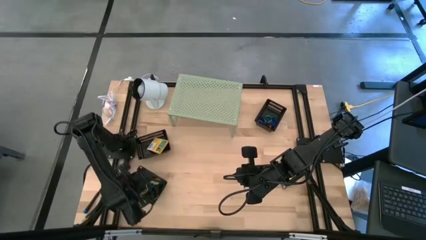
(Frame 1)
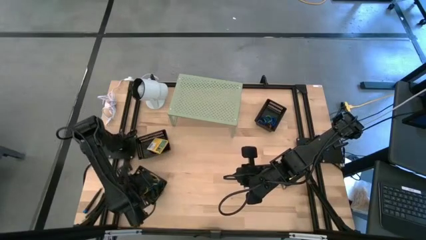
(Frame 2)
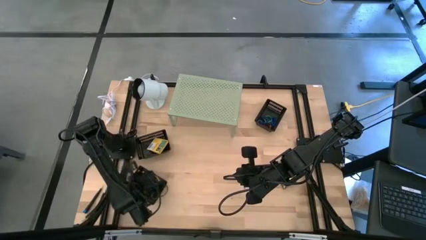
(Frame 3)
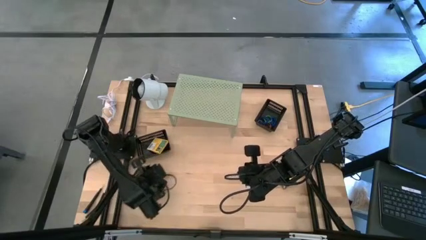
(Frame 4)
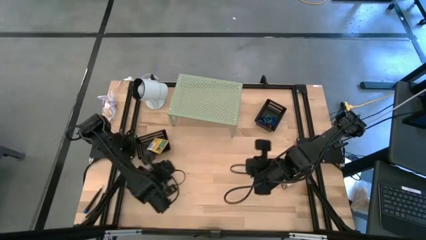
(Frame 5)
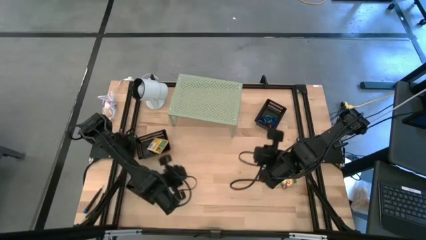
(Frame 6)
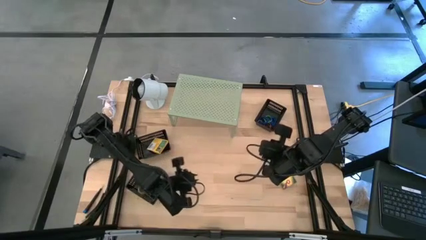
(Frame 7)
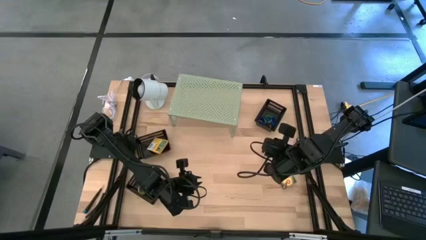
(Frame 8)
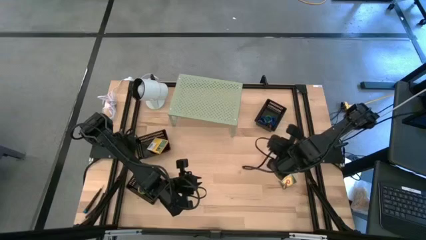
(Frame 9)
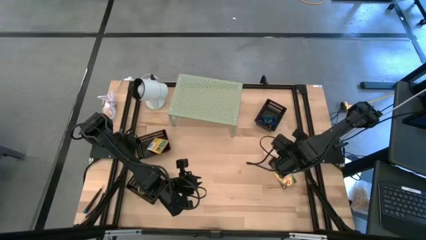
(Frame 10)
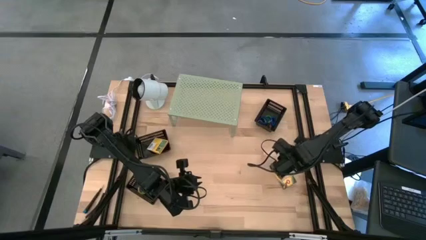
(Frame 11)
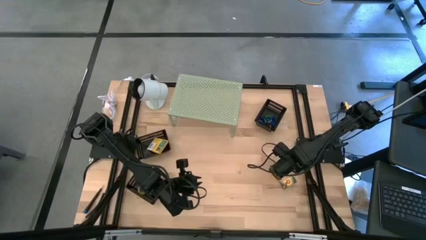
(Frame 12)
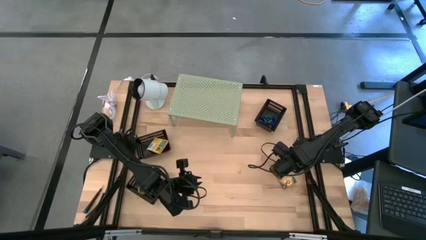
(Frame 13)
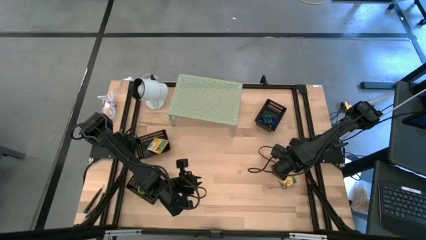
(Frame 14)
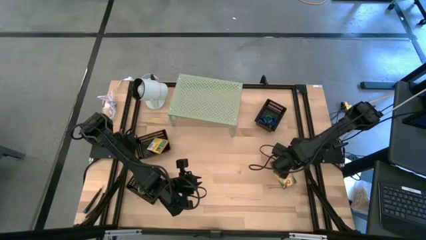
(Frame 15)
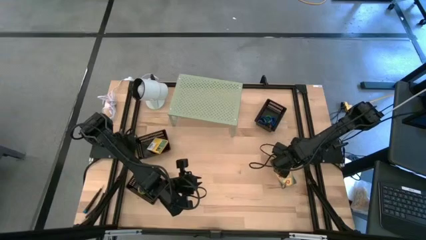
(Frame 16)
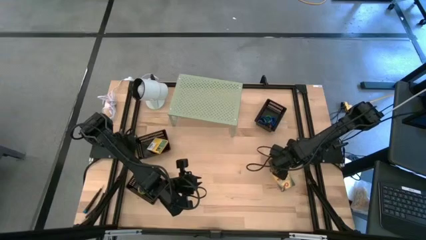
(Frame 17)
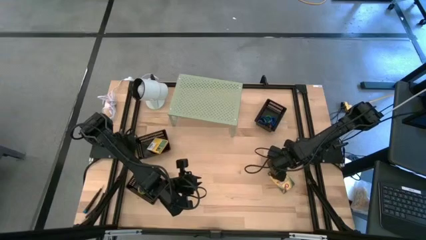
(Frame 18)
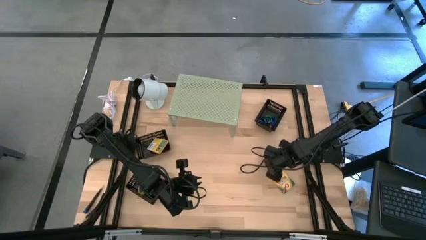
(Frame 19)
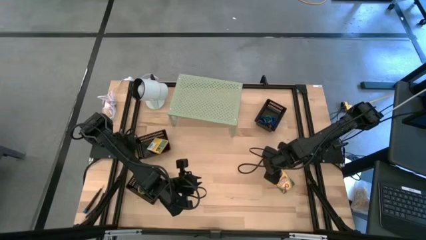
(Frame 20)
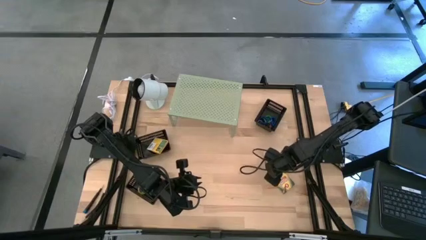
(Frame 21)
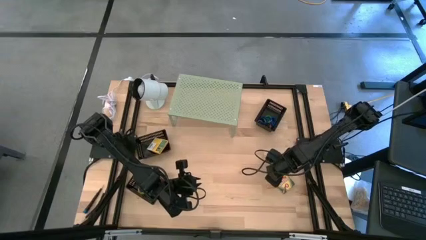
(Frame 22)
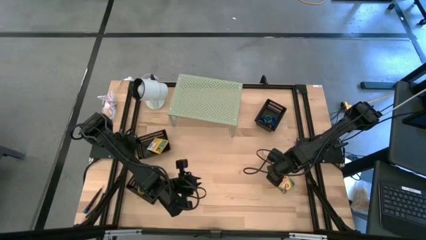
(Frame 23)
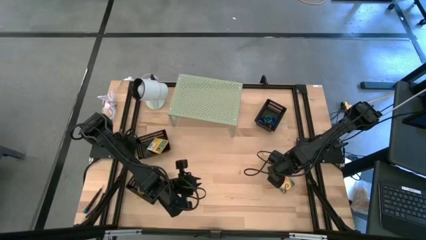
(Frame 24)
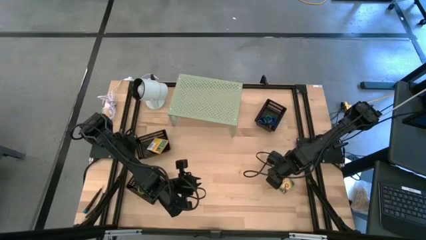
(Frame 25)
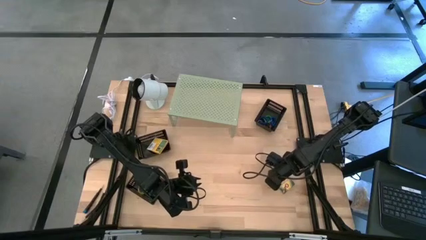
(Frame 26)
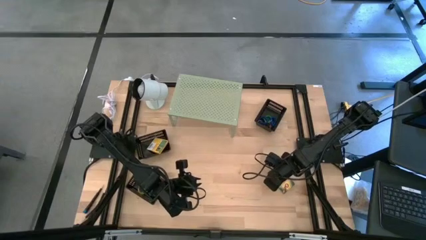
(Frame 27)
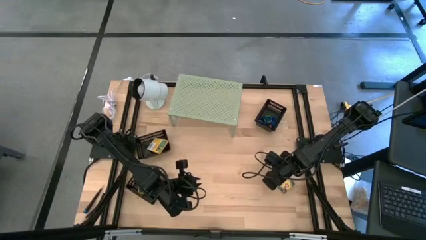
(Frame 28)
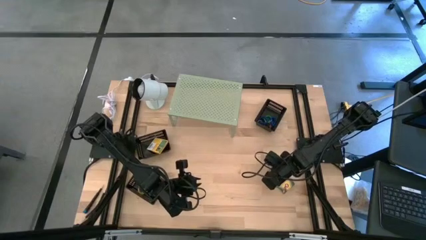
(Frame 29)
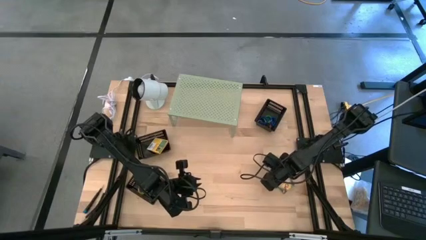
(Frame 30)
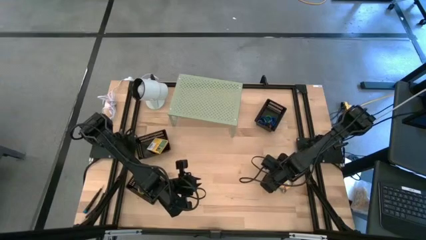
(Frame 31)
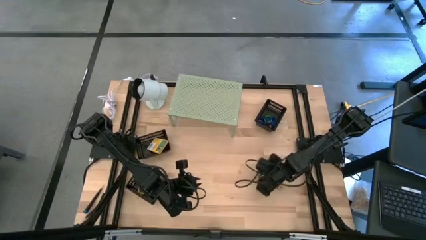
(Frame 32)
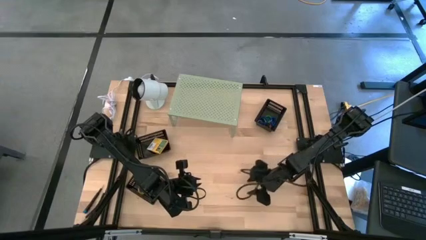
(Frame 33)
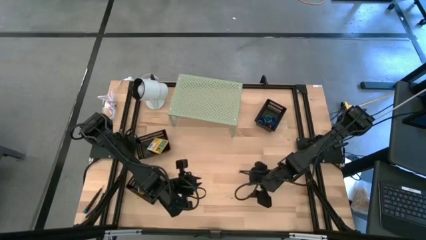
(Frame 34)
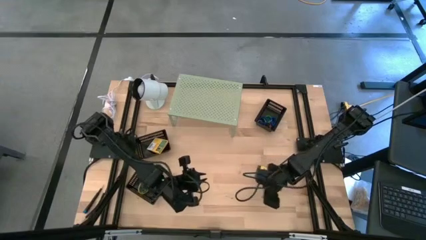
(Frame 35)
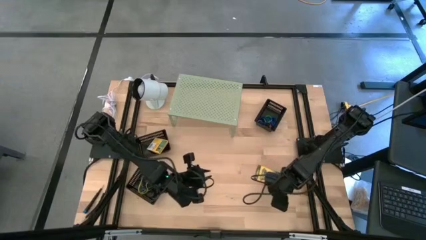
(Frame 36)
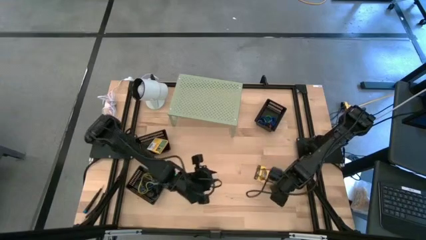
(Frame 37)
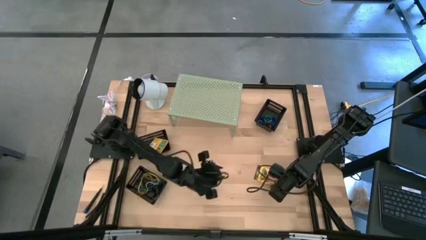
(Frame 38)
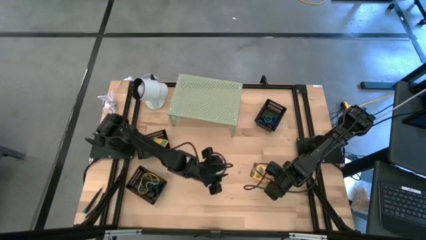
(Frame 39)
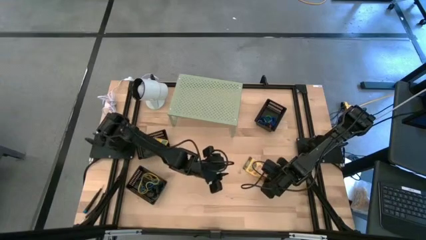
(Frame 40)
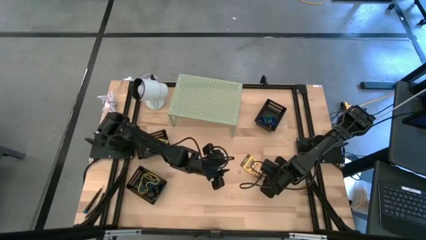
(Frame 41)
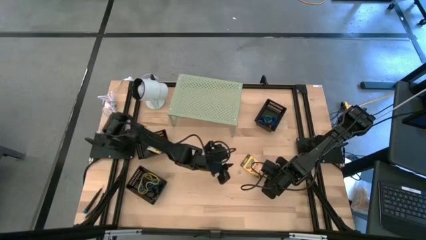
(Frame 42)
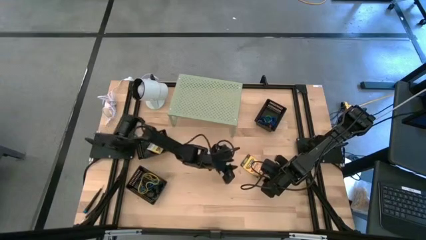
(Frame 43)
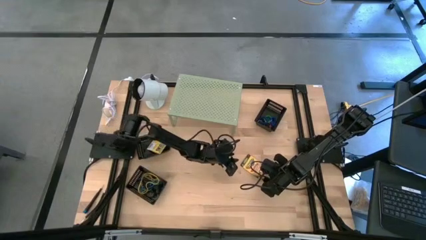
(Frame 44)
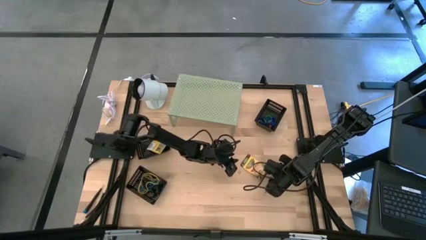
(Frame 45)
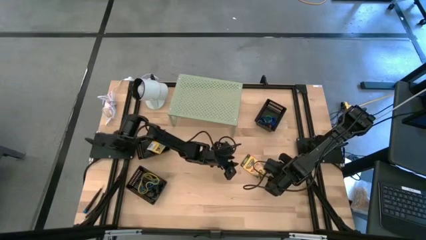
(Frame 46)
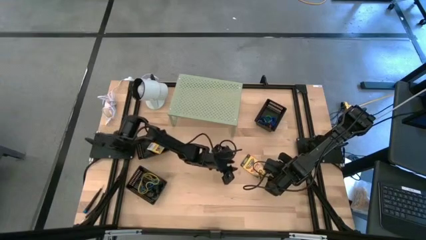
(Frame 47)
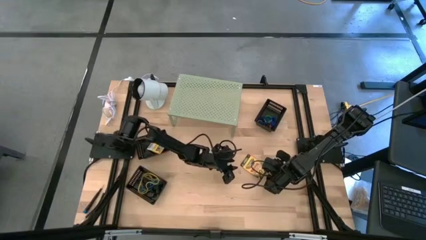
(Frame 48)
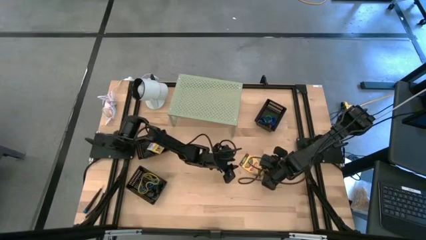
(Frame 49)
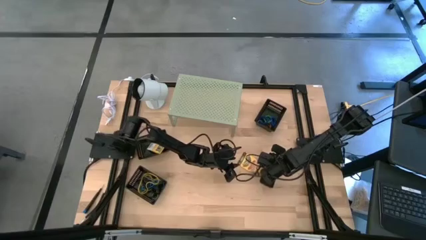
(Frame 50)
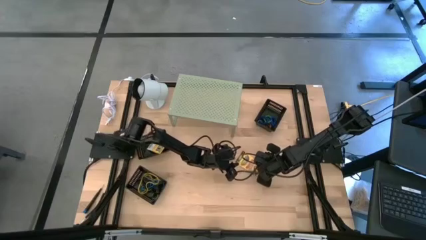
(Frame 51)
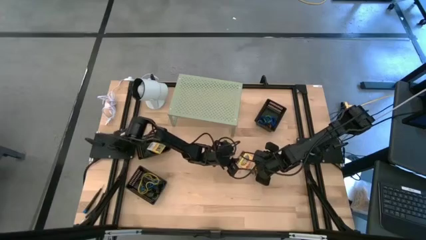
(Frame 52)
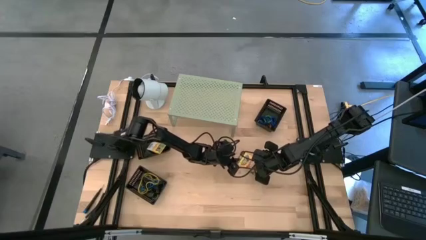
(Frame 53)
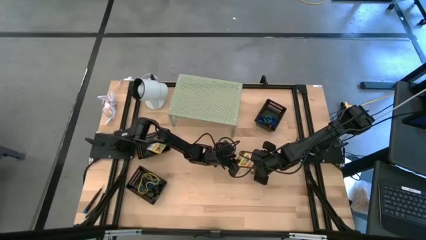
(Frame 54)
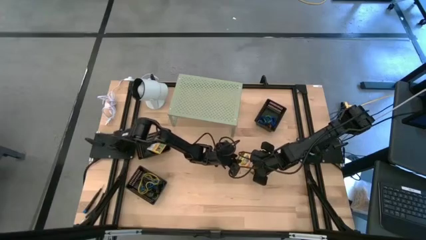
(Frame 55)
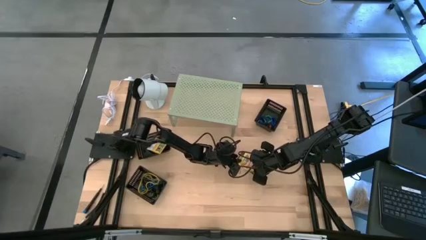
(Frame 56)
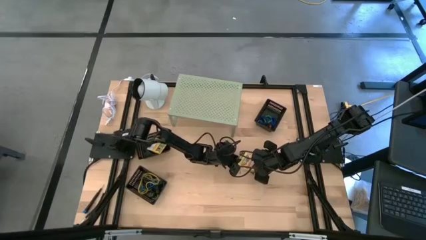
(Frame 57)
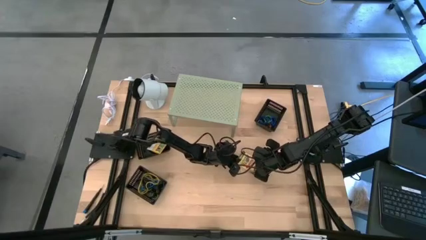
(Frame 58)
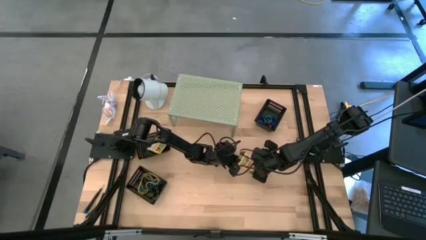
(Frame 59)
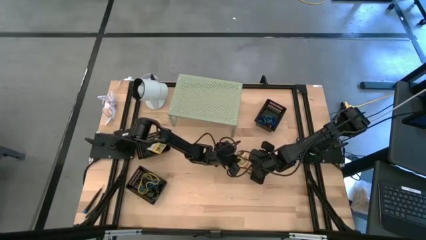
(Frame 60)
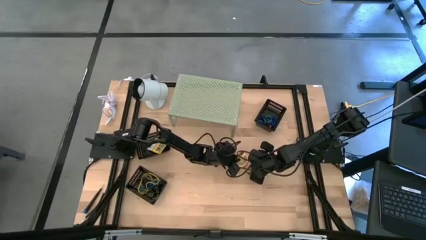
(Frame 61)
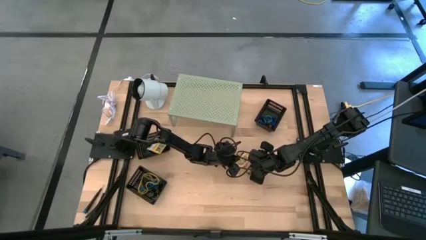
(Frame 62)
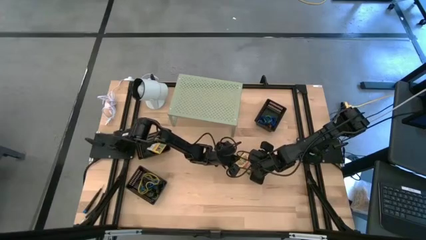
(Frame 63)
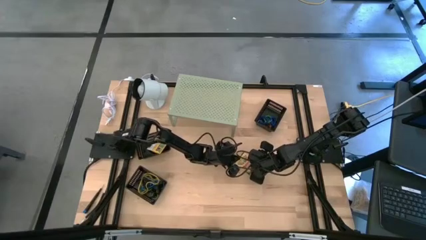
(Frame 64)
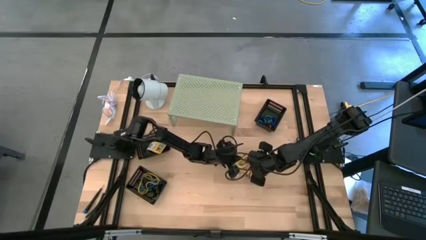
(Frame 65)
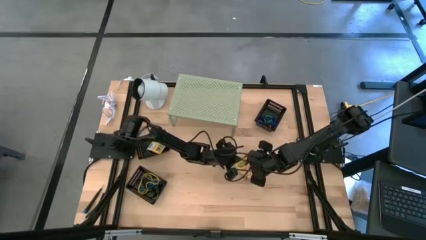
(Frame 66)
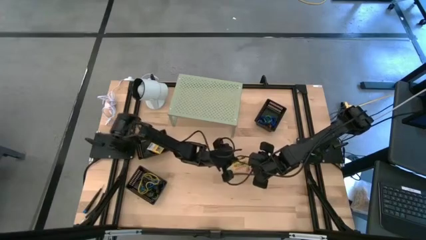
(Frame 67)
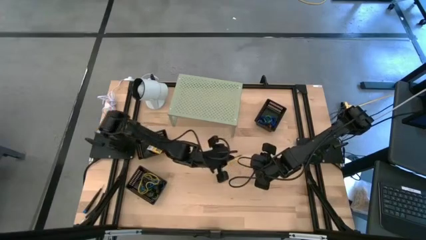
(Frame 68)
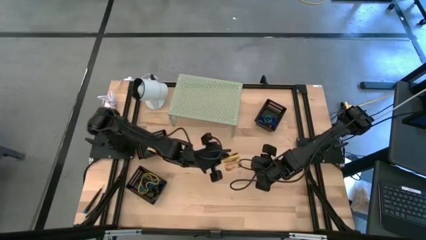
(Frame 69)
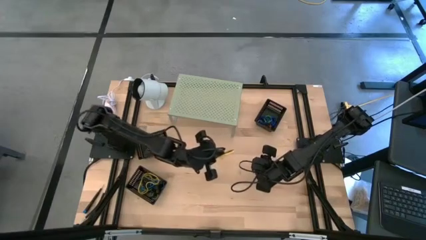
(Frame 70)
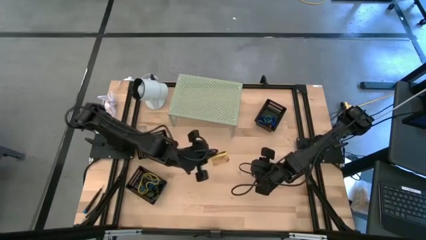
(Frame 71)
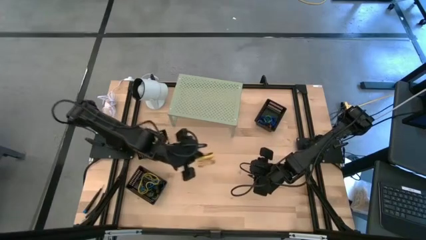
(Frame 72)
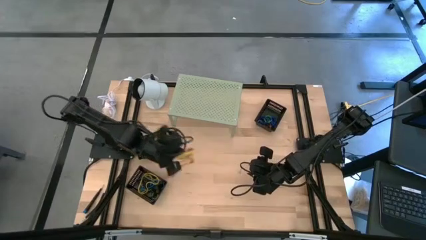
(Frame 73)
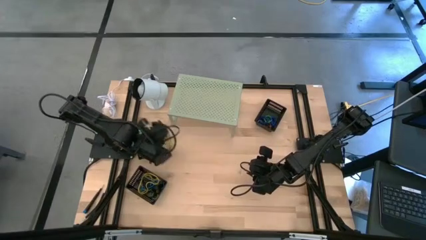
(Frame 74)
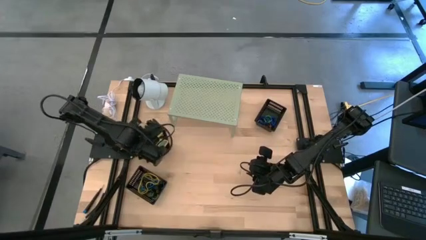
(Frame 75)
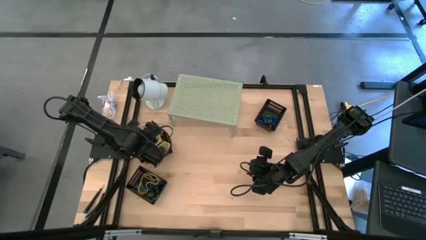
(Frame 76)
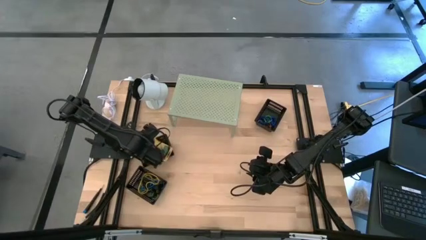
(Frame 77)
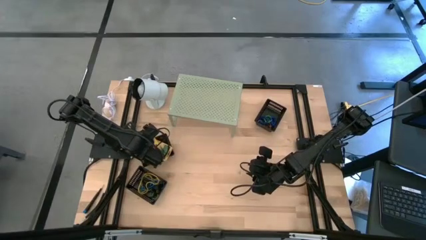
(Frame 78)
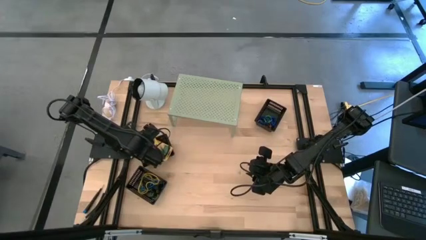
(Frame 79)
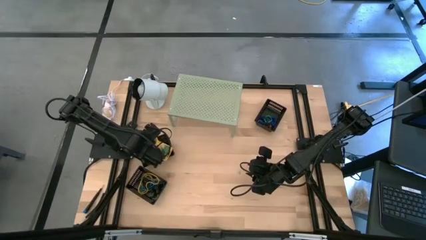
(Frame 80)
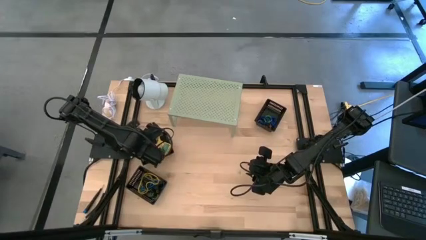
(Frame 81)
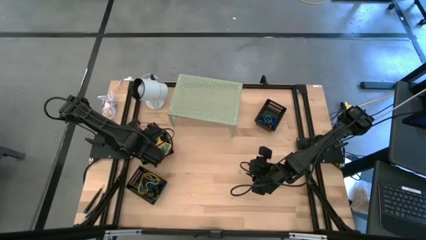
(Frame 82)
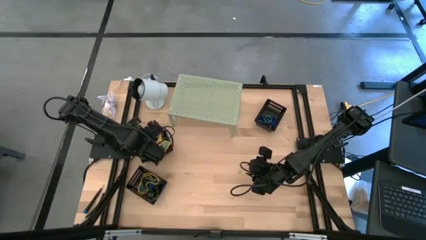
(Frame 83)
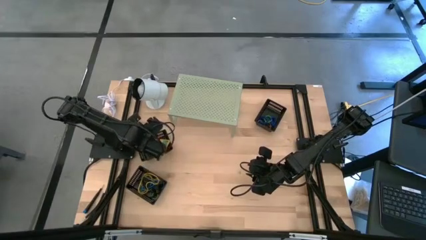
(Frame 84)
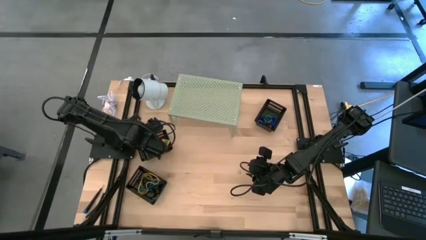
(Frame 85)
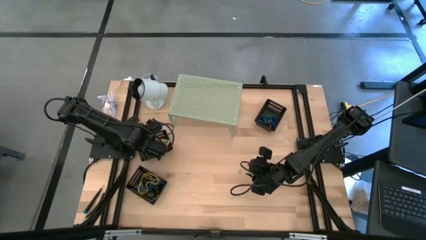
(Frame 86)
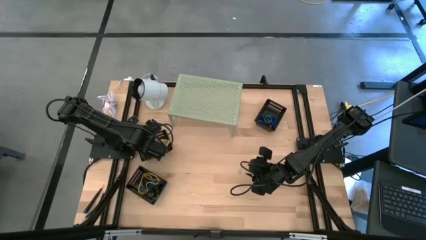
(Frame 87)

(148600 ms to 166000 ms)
Task: Pick & Place Office Desk Supplies
Put the yellow crayon box into the middle left black bin
